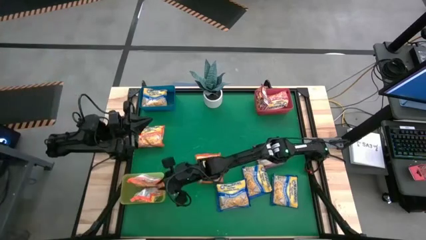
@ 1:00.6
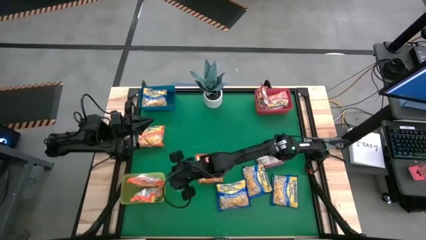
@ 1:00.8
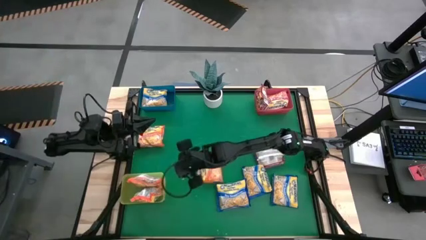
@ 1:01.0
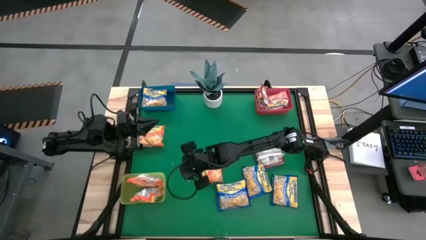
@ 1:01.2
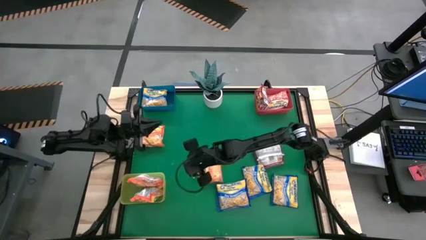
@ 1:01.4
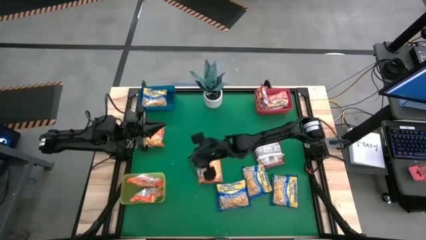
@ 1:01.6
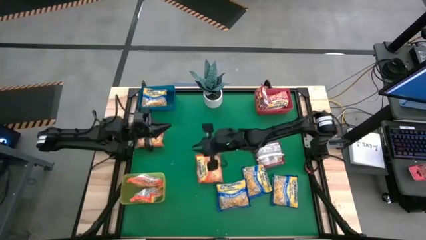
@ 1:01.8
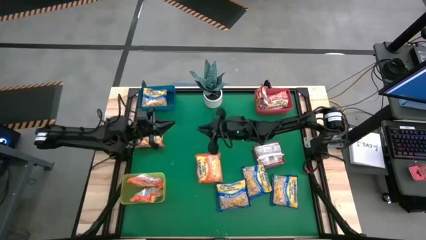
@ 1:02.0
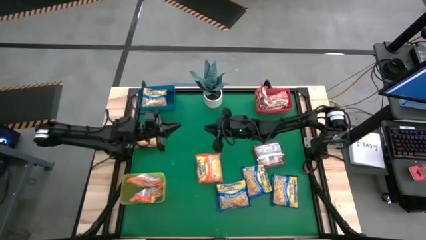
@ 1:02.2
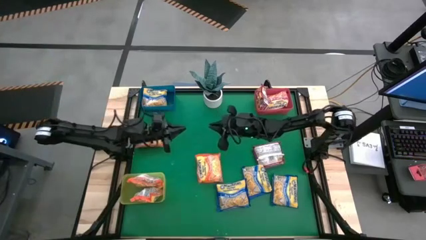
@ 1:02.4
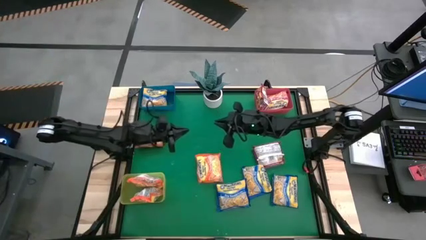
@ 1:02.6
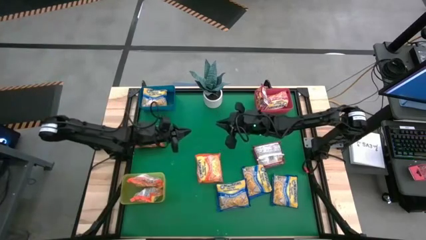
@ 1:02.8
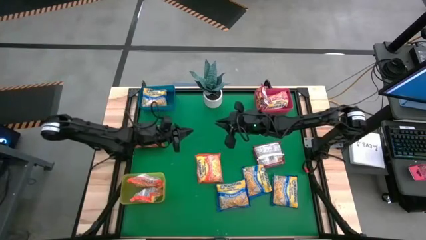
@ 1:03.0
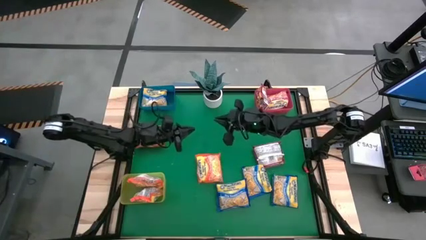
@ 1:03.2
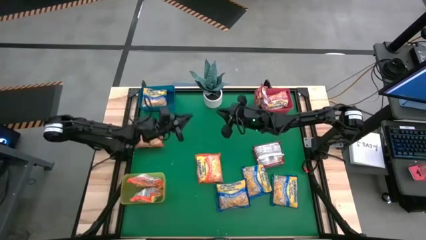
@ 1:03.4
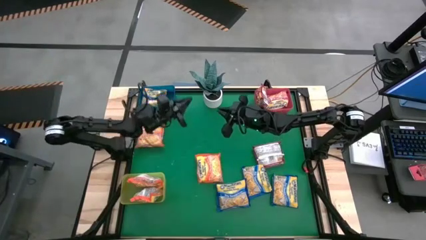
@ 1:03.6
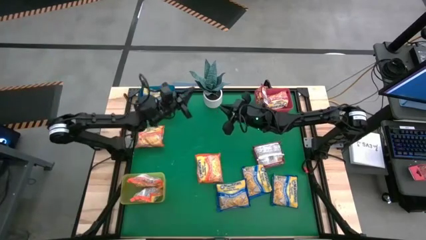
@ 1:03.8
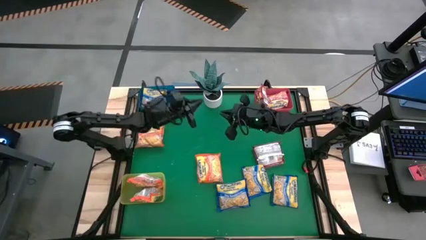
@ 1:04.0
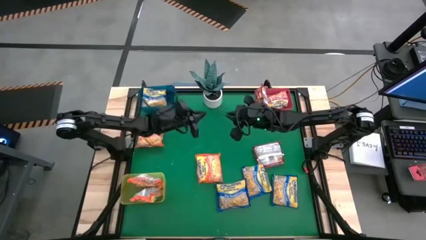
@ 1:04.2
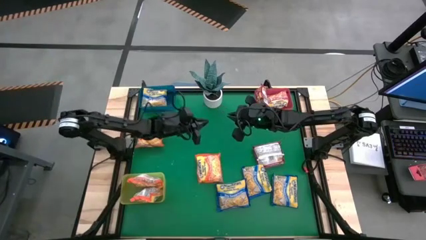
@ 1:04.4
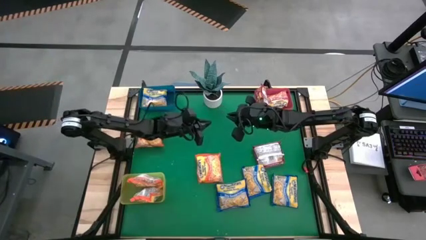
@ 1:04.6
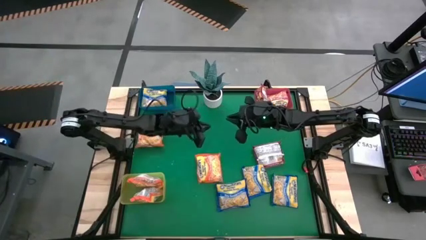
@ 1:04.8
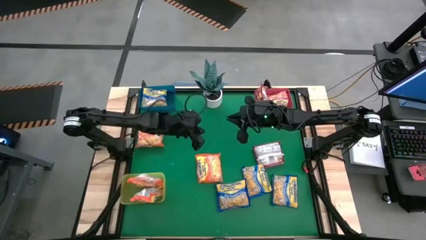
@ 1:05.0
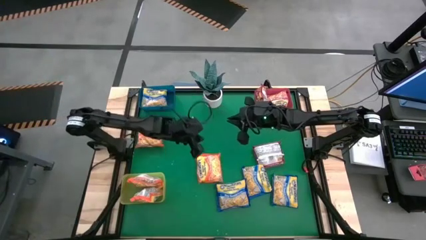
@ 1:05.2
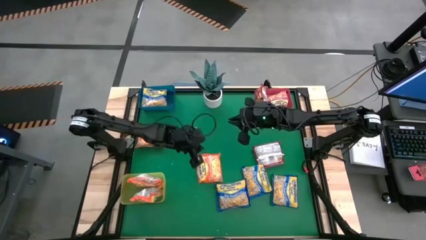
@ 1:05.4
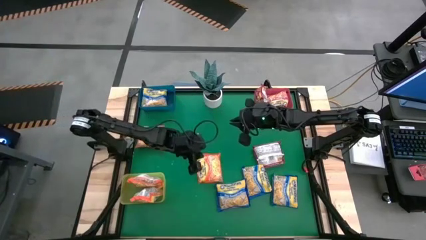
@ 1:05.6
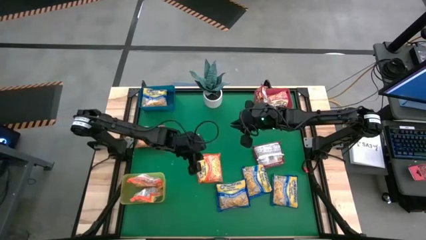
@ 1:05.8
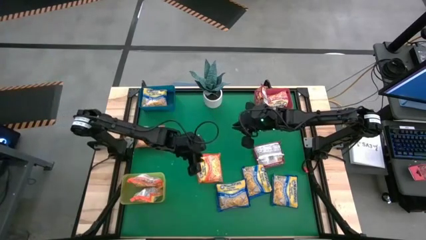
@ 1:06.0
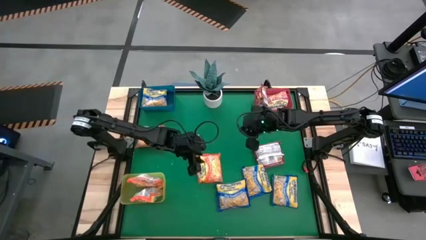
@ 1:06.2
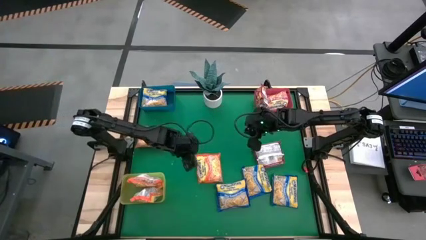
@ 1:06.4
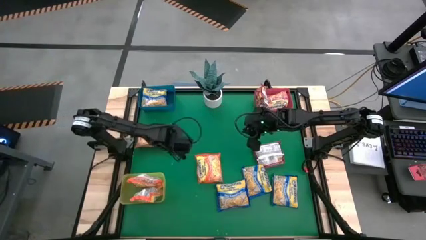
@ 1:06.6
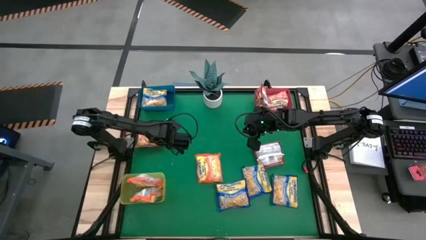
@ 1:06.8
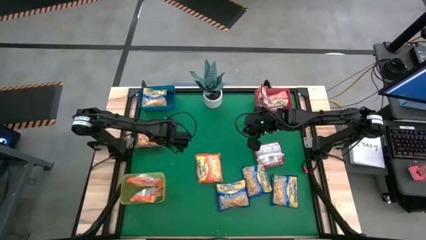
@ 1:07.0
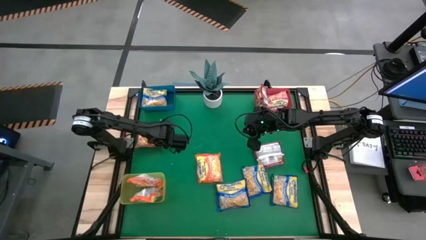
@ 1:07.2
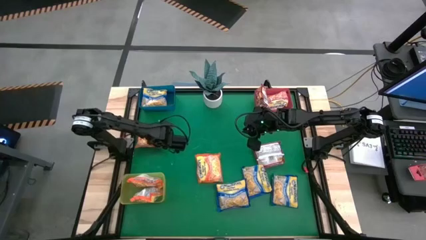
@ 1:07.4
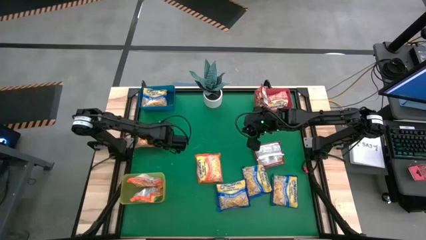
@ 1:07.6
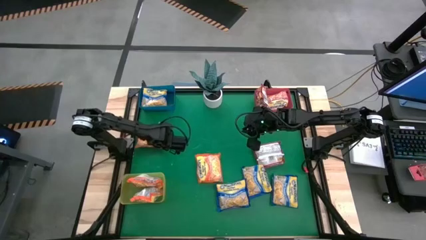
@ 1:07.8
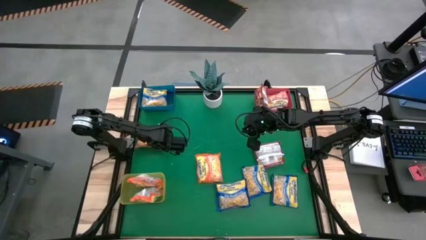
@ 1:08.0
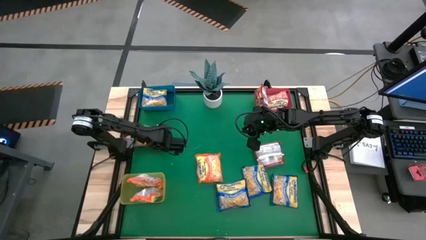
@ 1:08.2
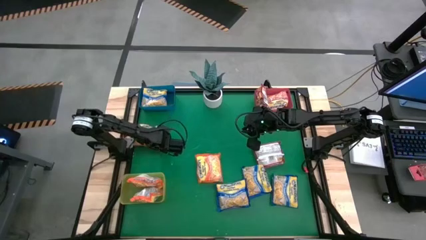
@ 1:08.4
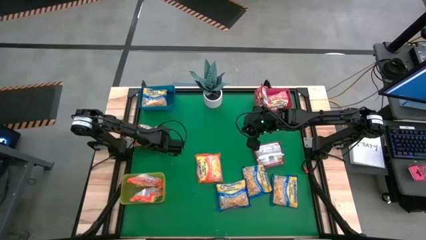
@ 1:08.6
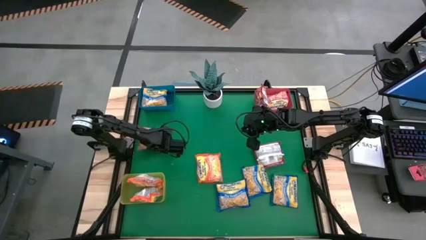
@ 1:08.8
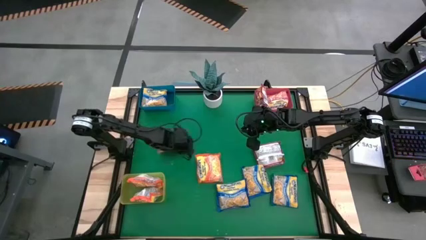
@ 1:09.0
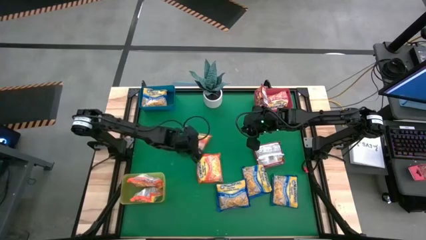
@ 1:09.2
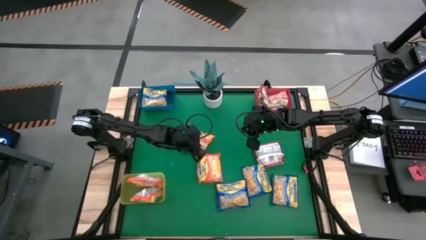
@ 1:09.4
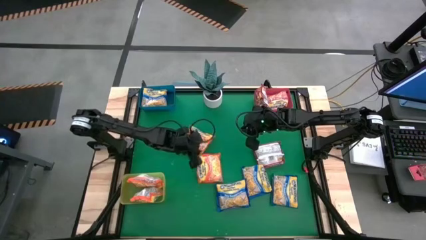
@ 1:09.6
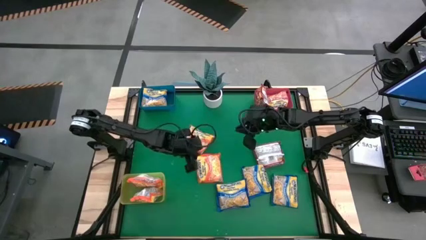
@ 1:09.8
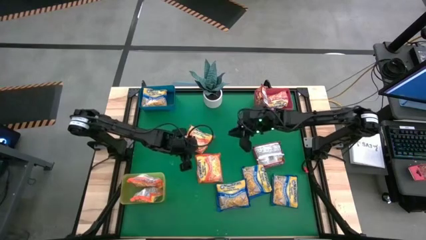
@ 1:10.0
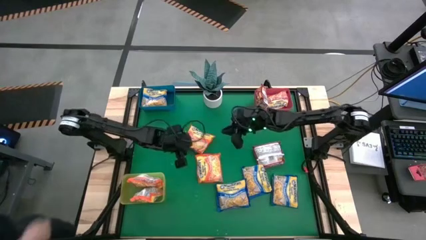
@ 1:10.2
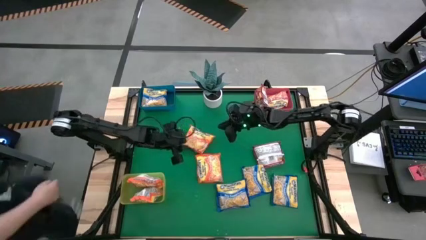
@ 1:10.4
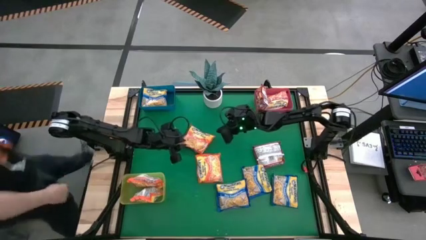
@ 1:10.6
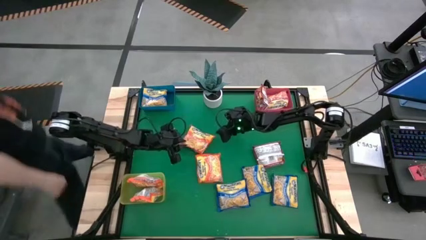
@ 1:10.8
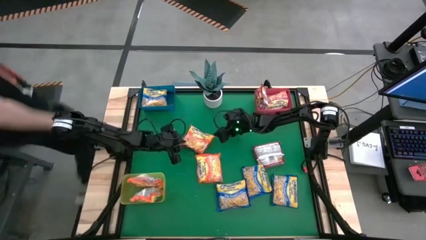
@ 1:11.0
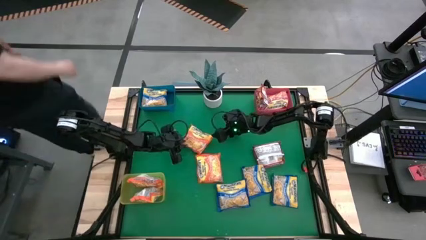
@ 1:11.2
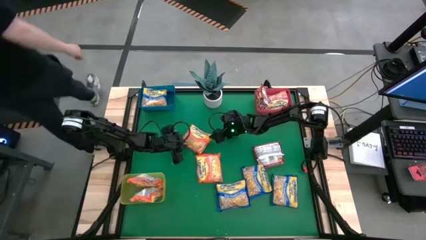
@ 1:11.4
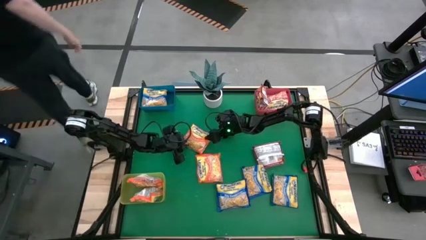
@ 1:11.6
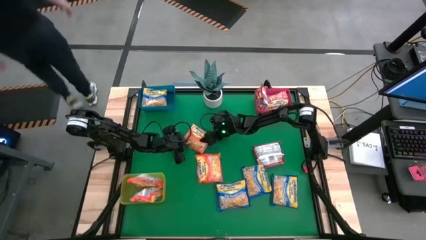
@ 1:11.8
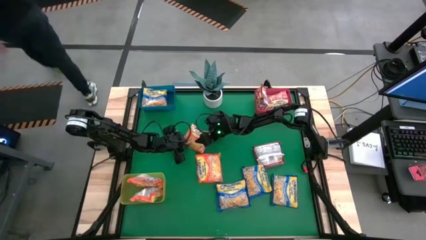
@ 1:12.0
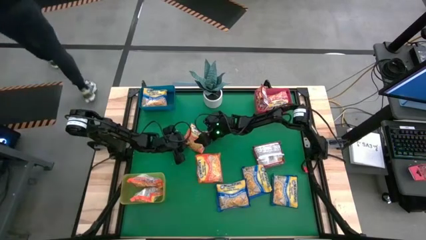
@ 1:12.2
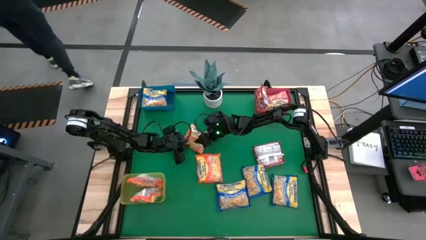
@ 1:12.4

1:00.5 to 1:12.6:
Task: Sort Maruchan noodles
Put the orange noodle pack into the yellow bin
